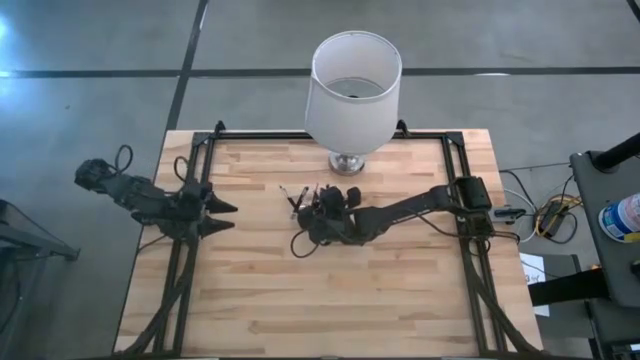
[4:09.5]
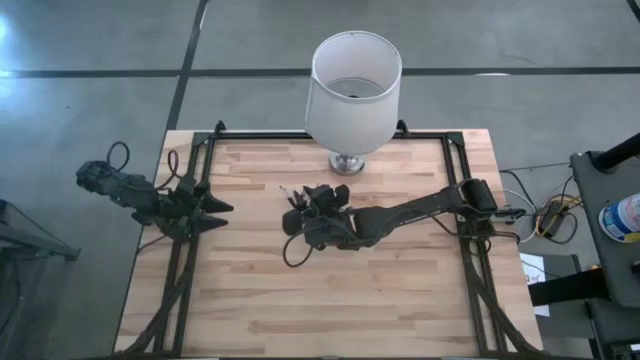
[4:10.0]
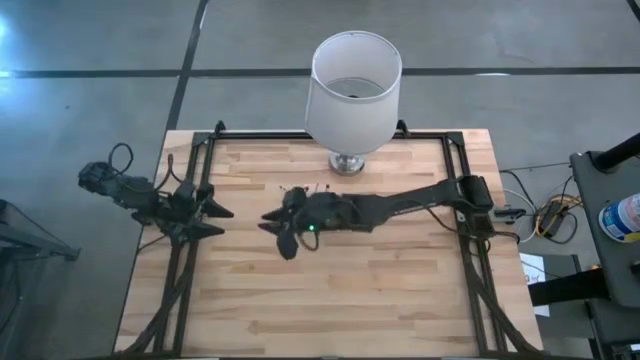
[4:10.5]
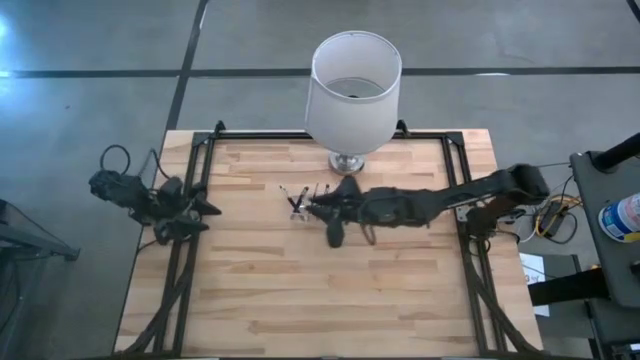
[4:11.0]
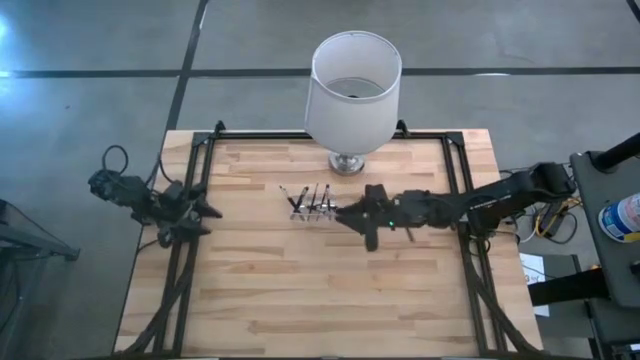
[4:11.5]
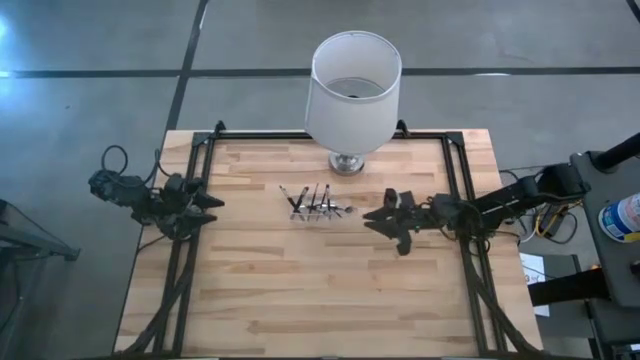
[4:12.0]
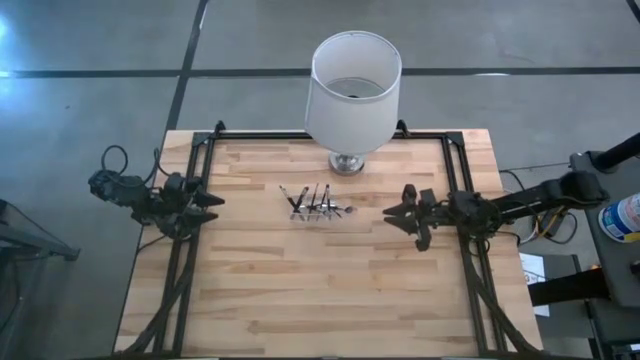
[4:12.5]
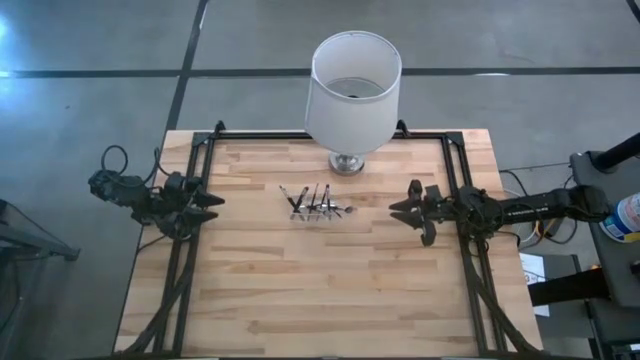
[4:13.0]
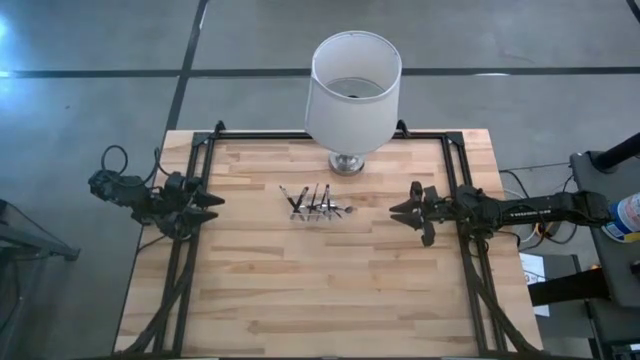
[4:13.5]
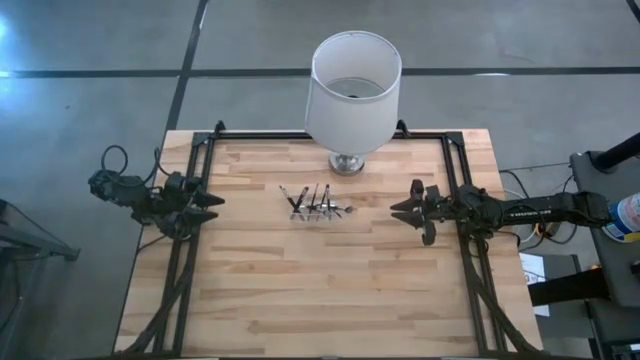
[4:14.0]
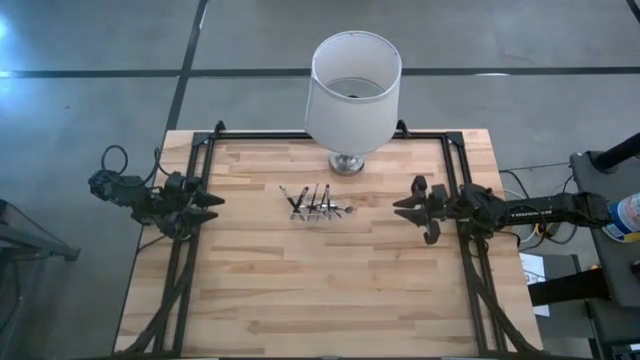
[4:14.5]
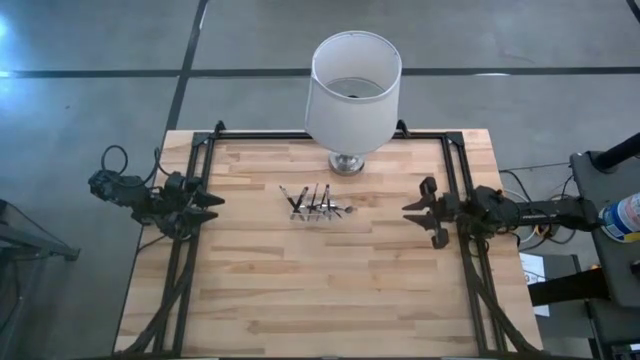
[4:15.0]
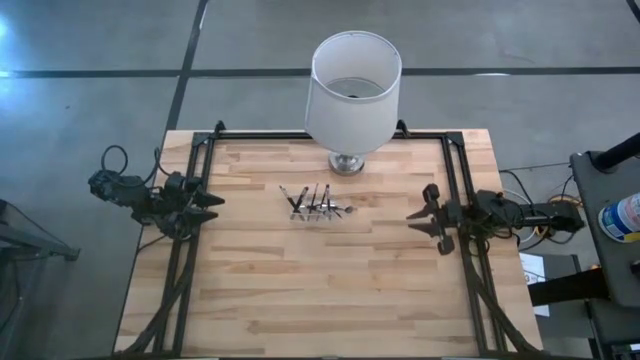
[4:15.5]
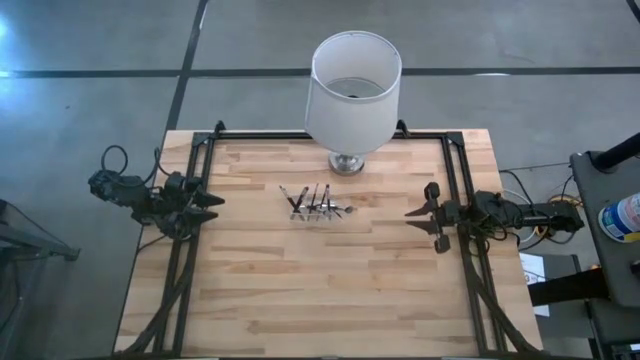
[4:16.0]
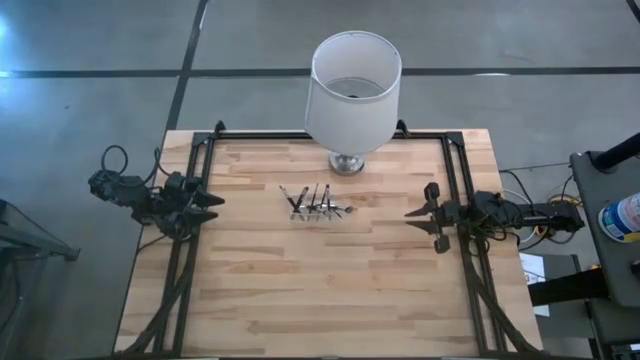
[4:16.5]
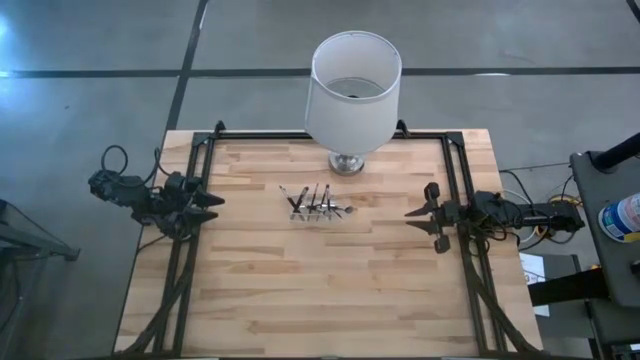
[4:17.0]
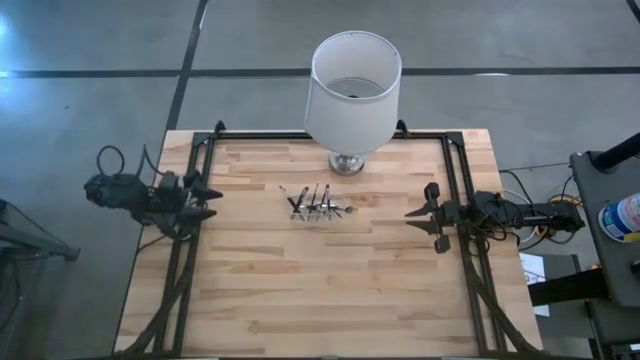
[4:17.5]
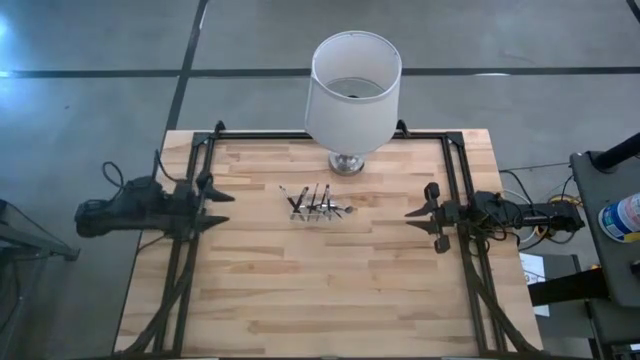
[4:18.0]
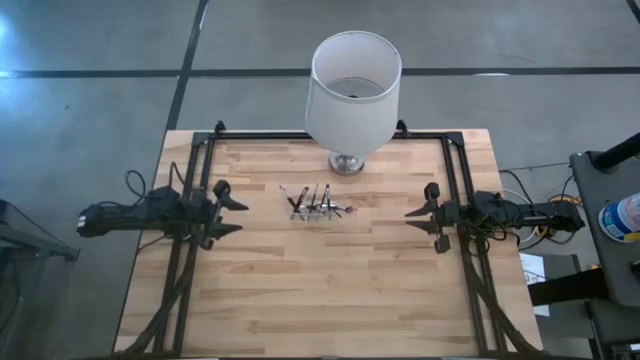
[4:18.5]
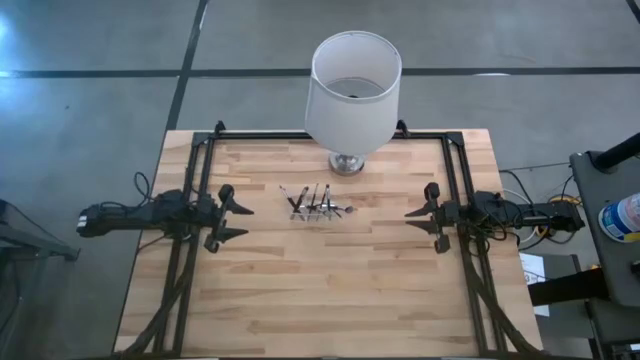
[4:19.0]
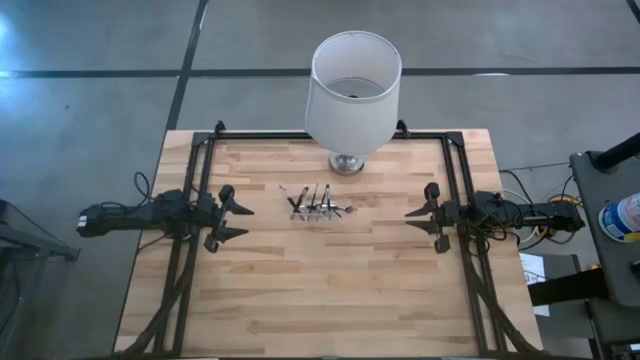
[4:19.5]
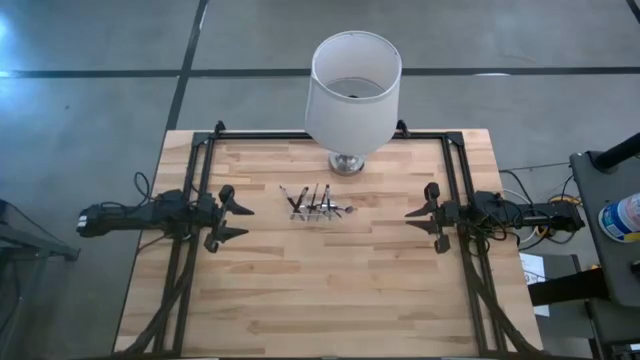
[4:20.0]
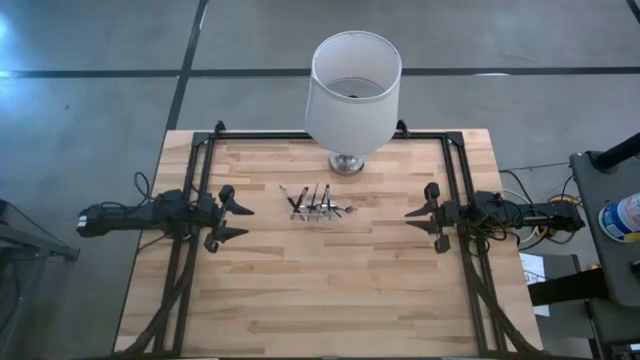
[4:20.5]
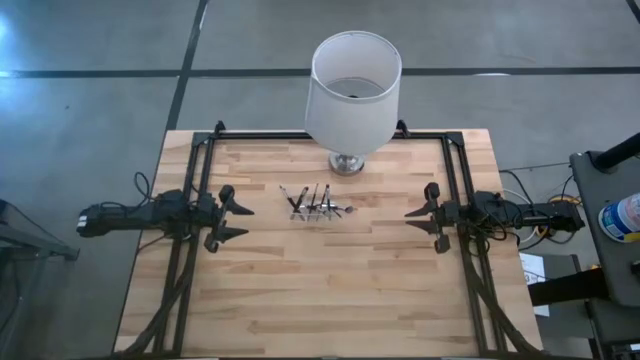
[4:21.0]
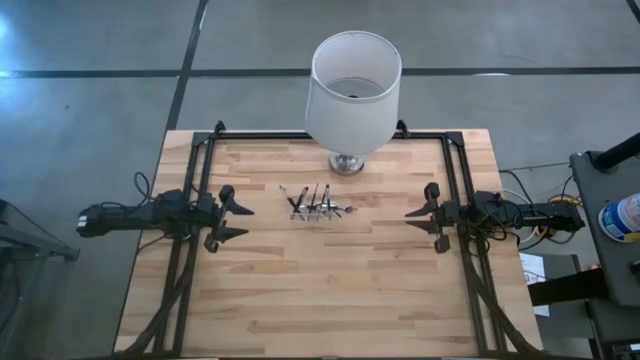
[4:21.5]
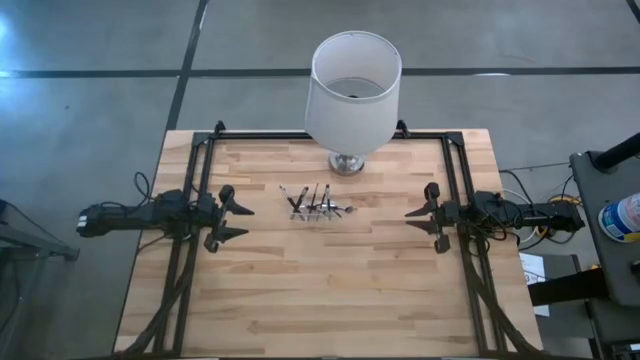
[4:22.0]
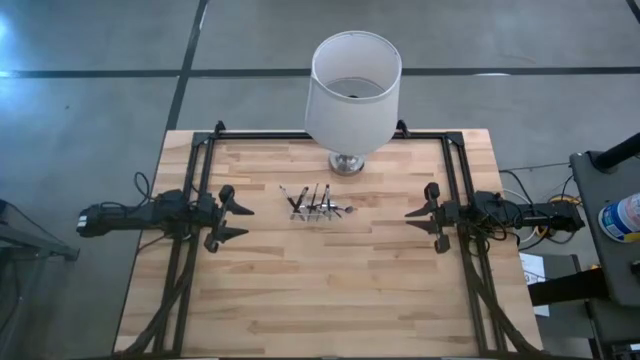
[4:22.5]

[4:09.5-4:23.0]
Task: Put items in baskets/containers
Return to Home Position

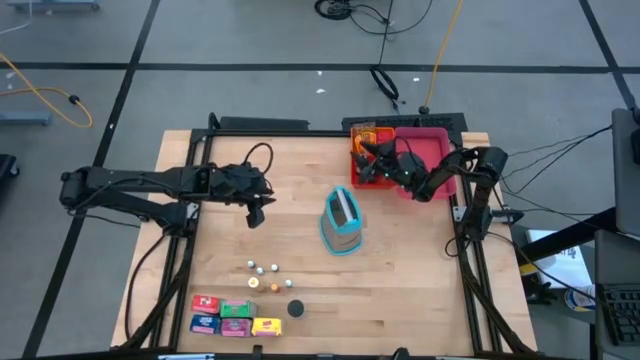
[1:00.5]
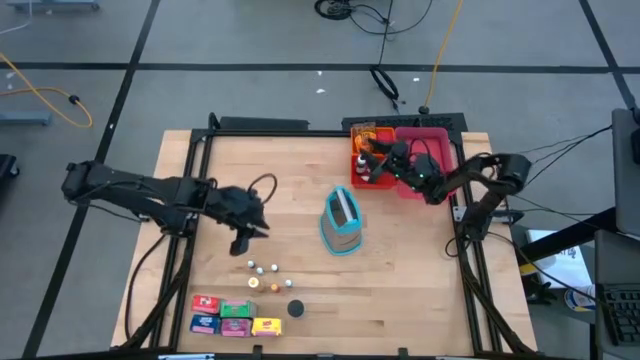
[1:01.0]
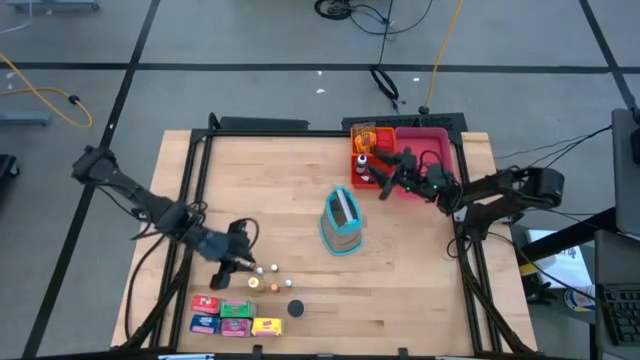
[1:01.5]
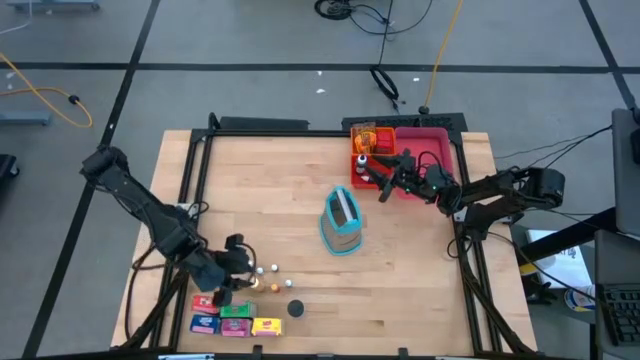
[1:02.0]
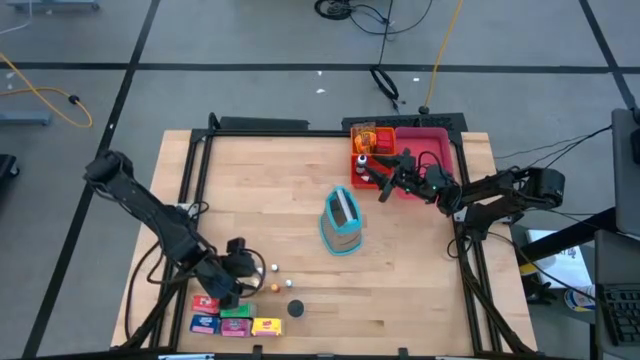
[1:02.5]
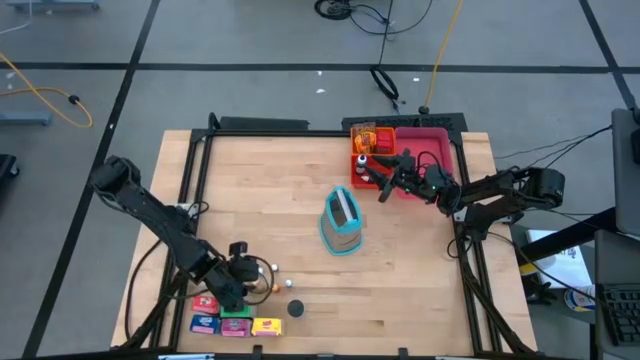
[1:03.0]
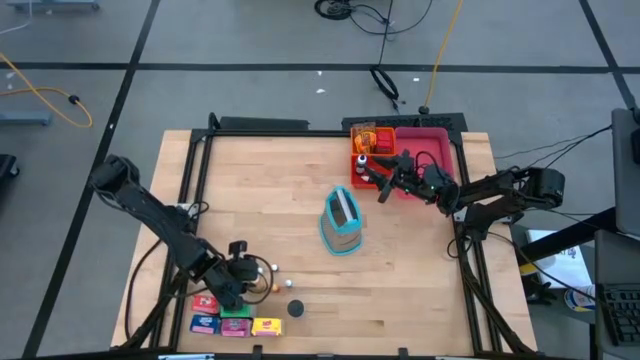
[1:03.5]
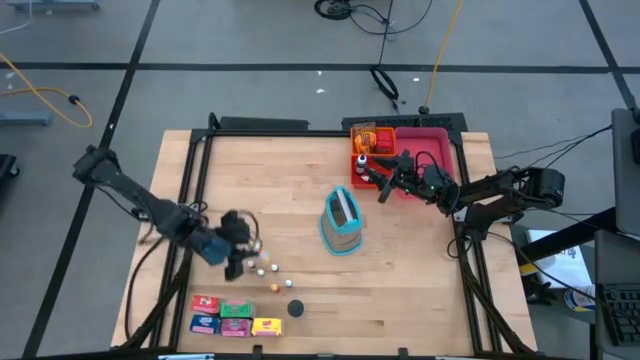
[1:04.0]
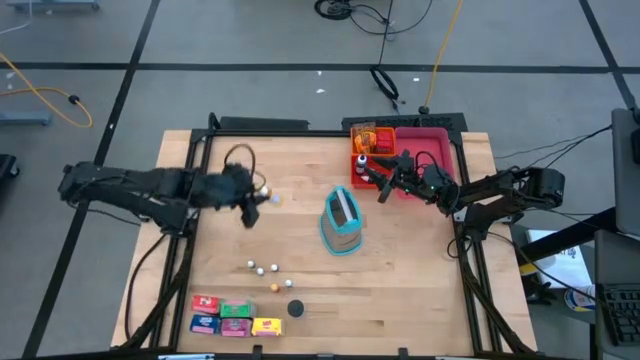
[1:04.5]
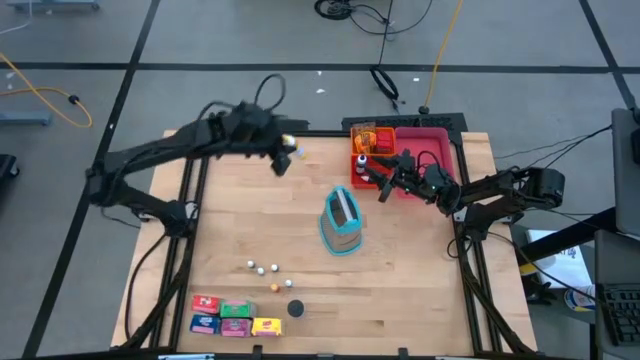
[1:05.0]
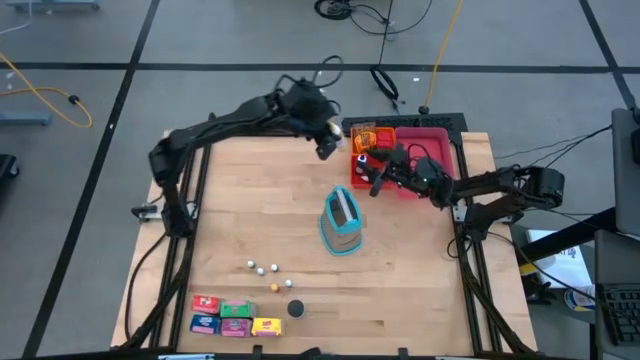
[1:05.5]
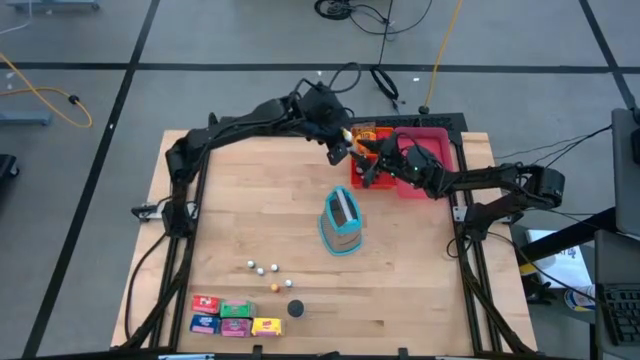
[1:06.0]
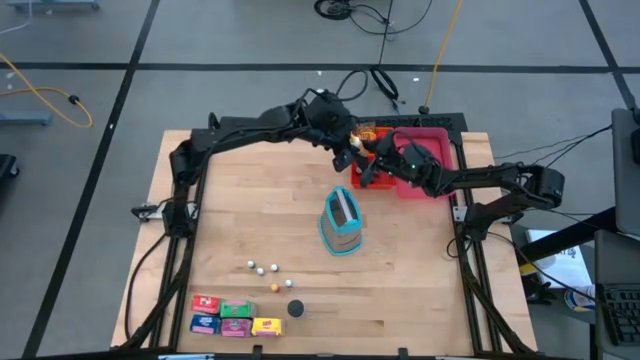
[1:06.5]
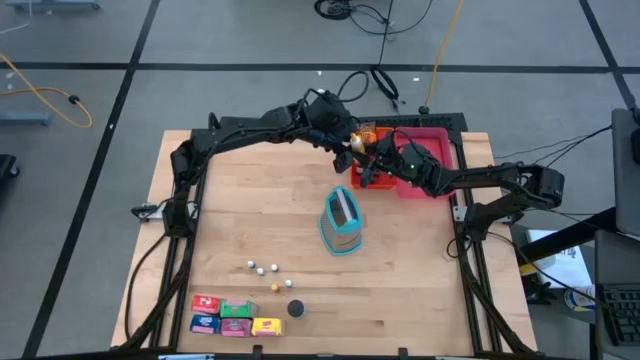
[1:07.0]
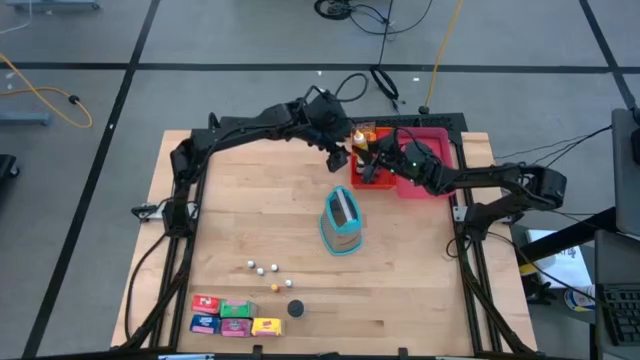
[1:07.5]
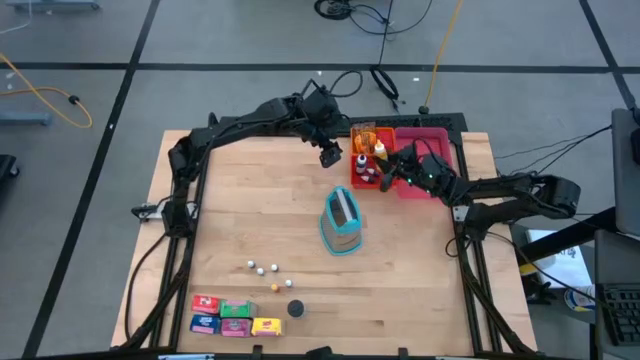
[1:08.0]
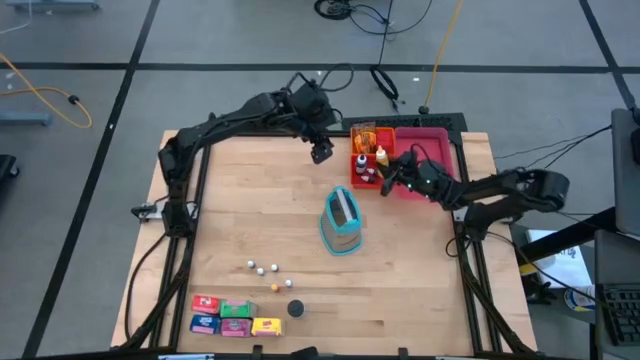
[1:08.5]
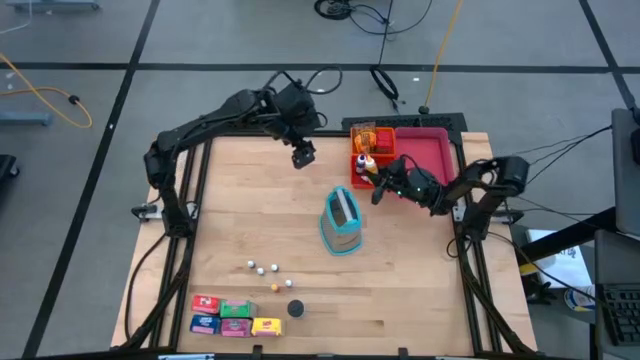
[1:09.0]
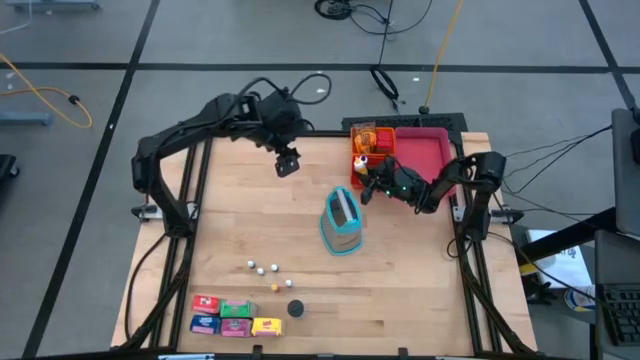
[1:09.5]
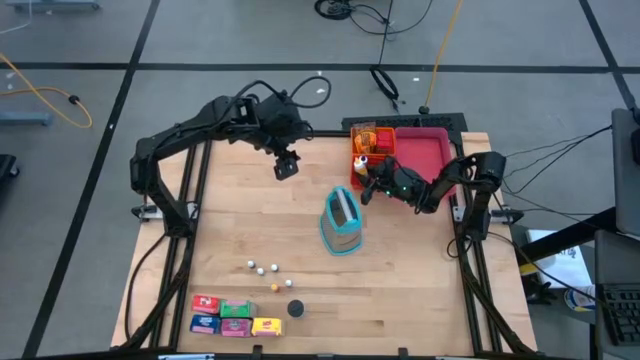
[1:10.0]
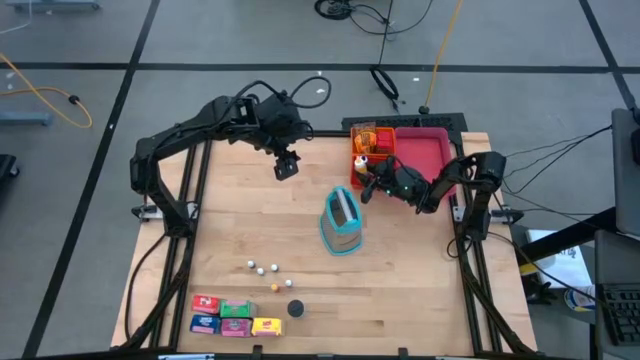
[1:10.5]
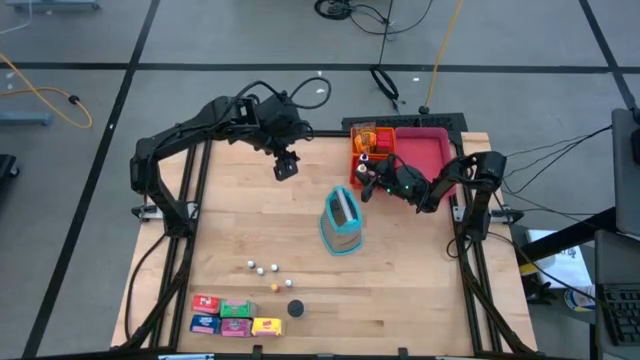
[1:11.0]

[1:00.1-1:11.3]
Task: Pick & Place Kitchen Items
Put the large yellow food coloring bottle into the red bin
